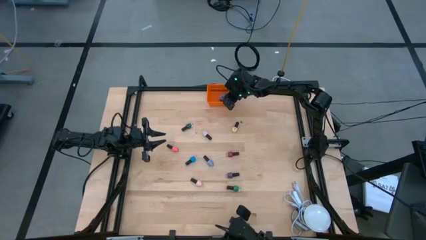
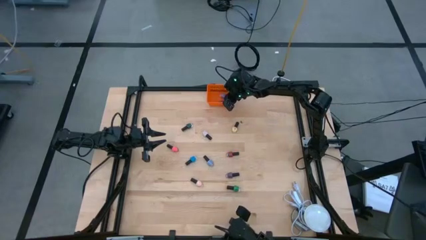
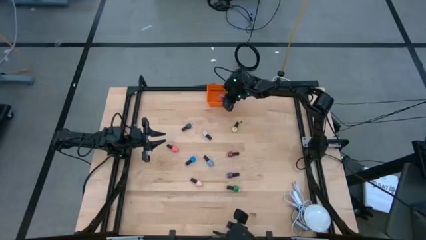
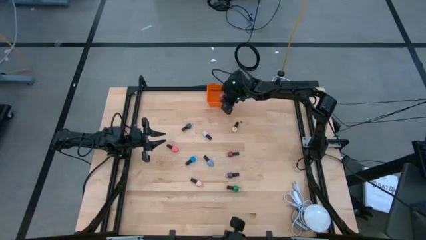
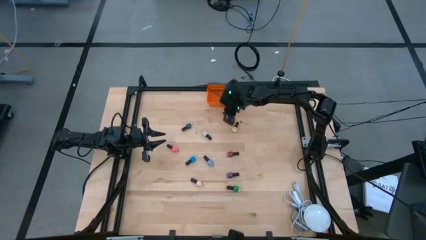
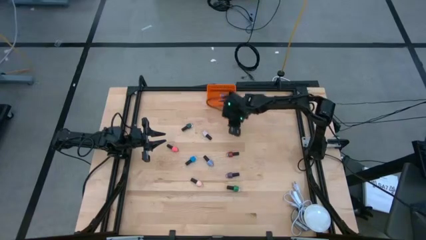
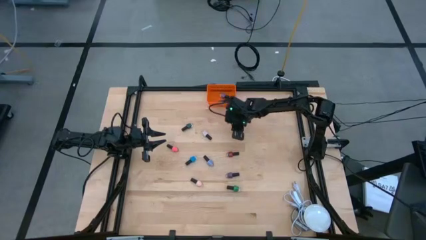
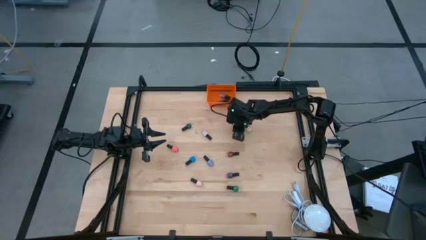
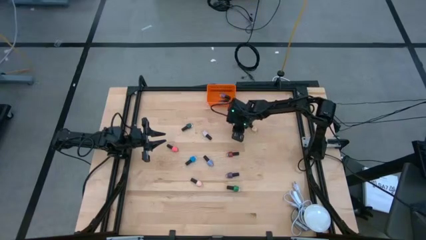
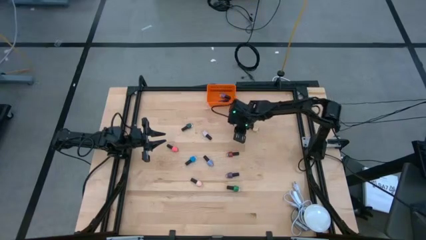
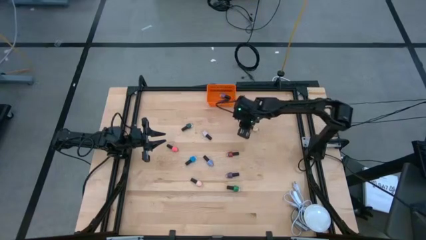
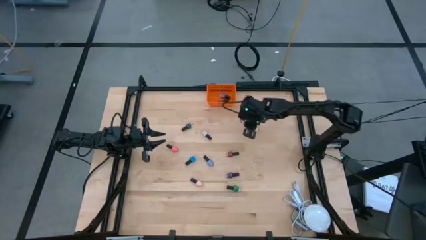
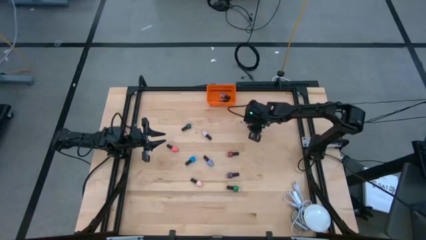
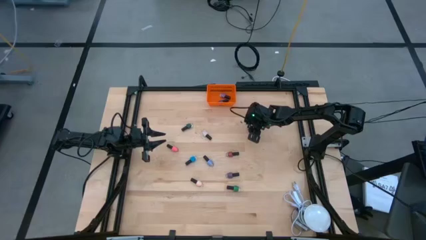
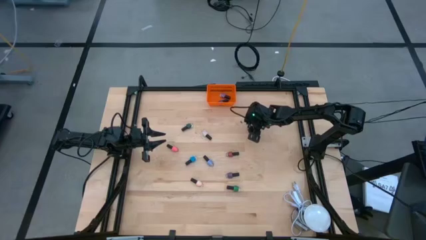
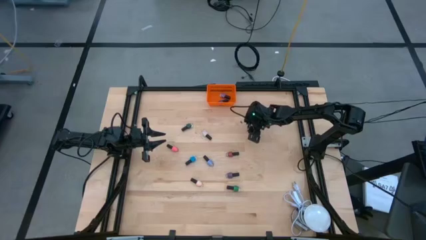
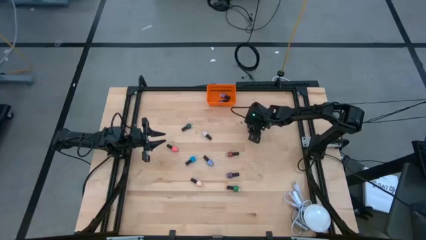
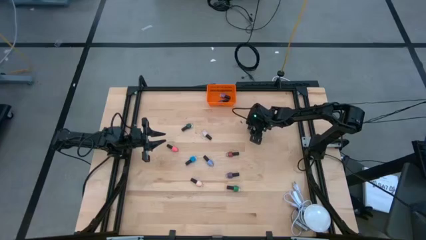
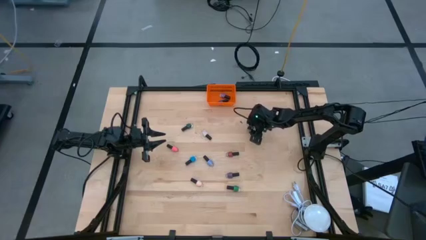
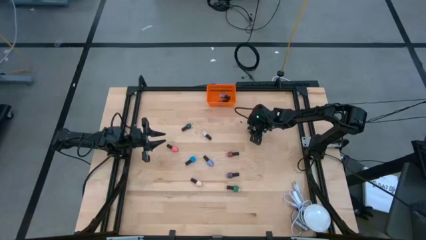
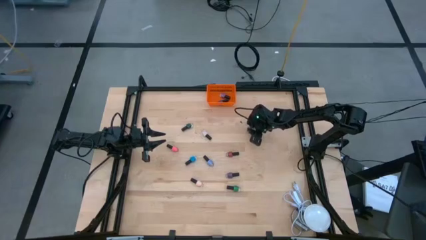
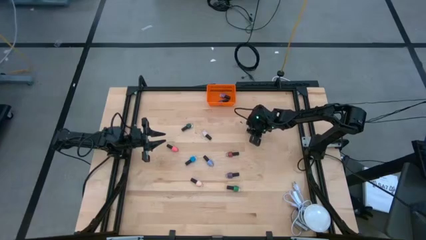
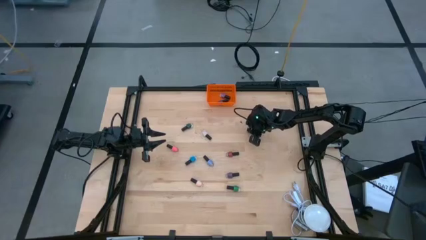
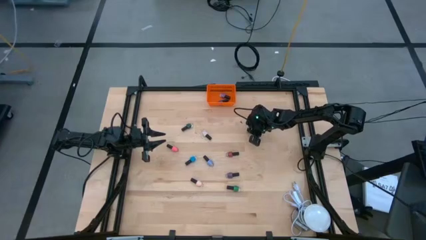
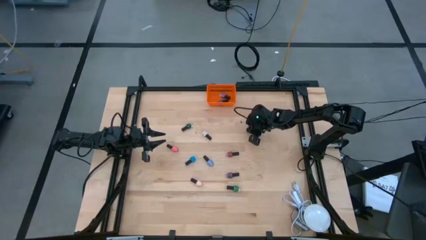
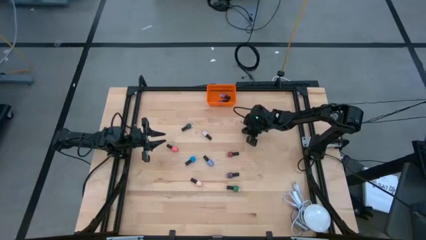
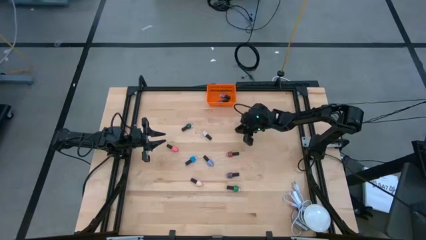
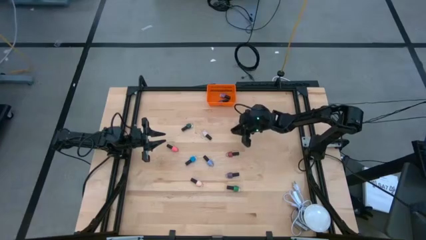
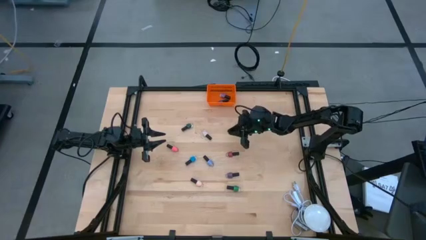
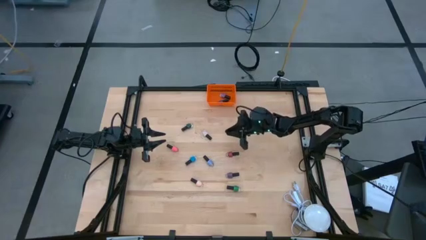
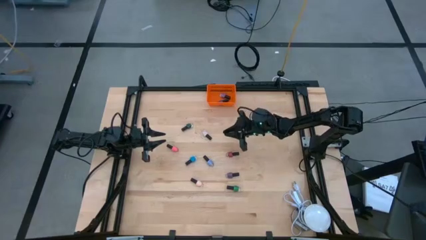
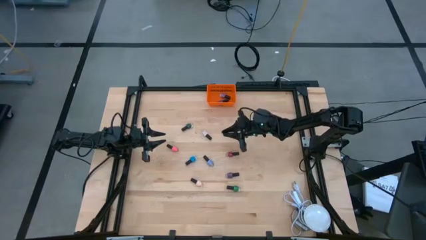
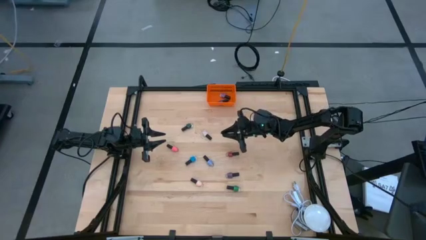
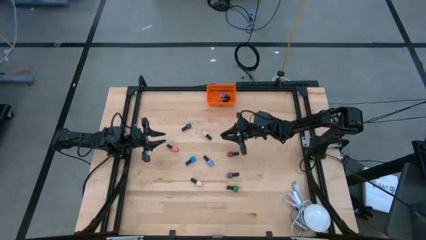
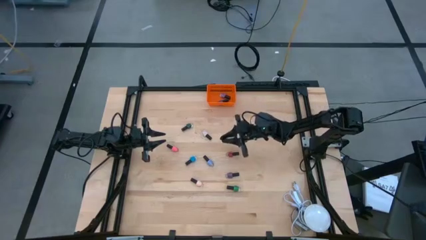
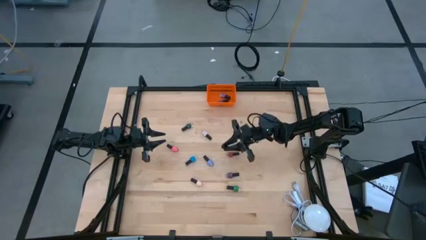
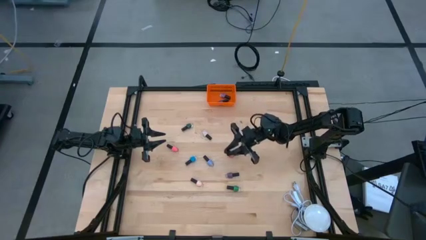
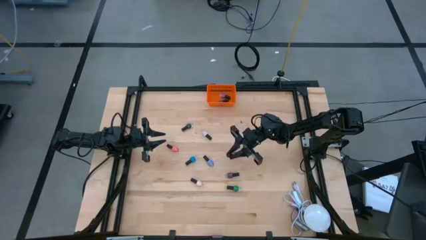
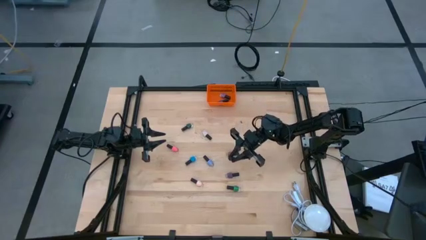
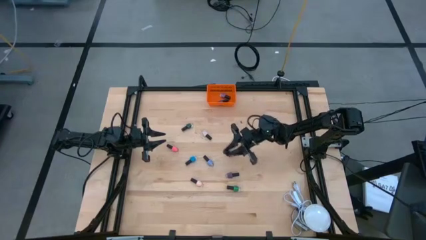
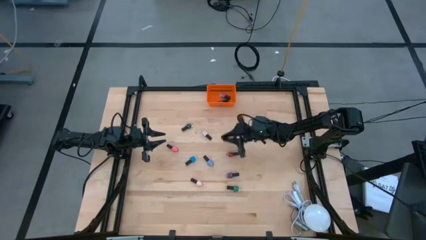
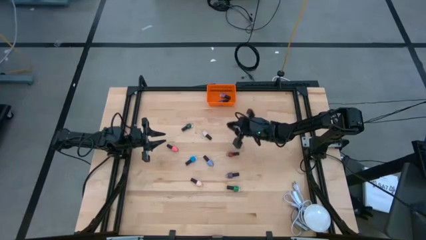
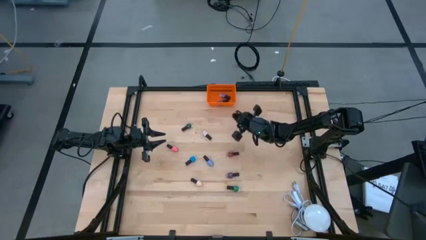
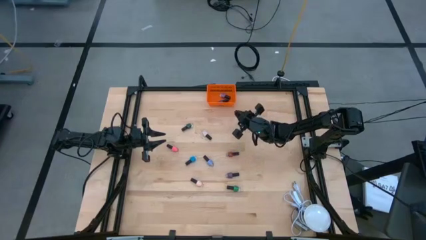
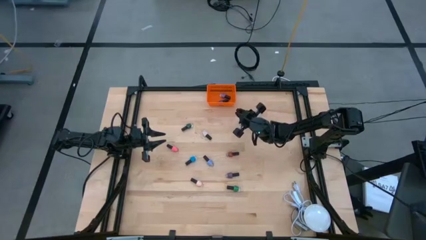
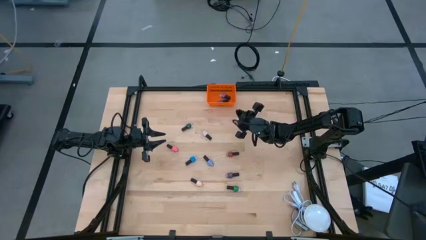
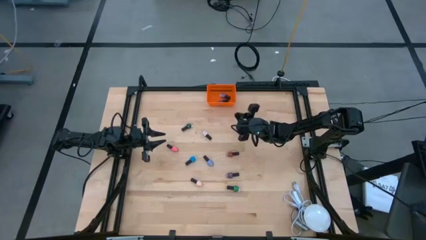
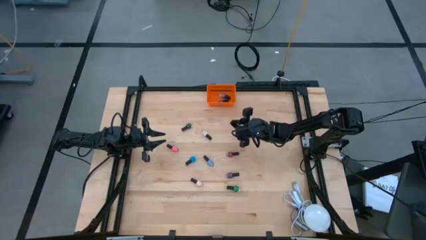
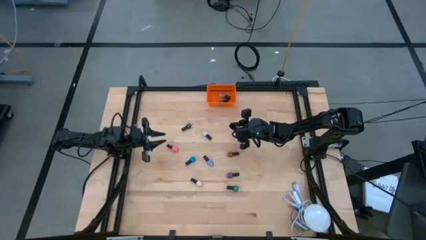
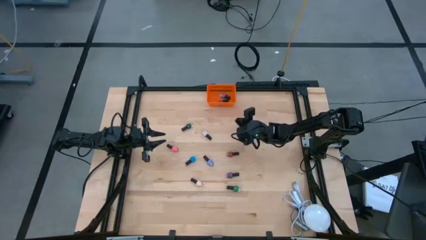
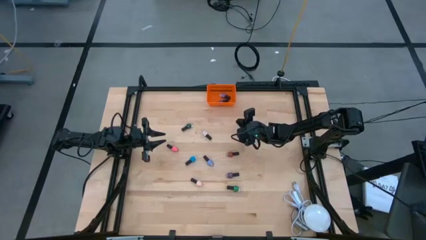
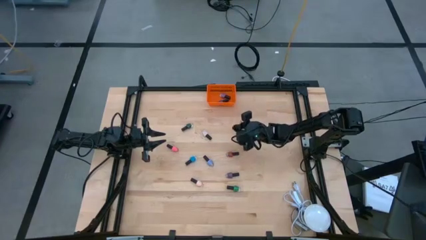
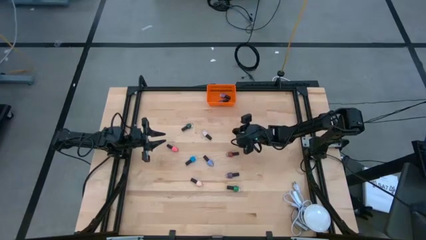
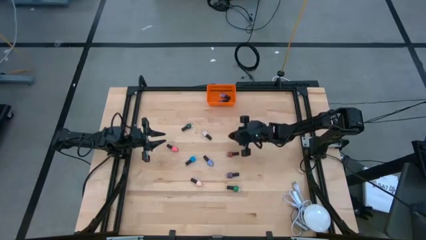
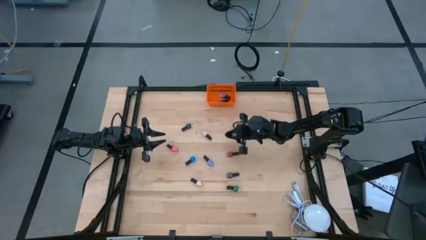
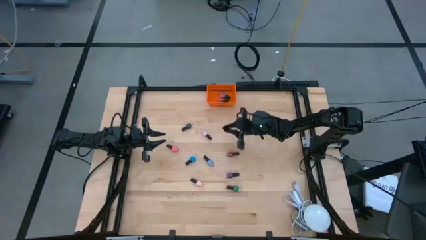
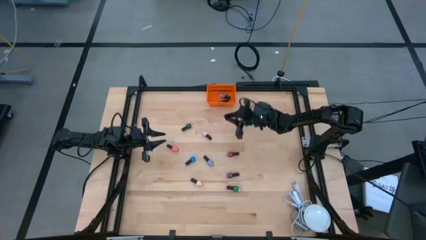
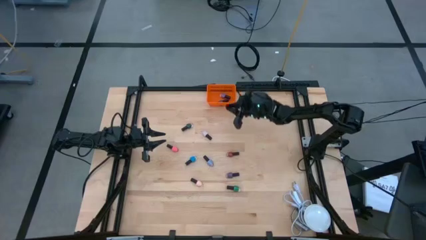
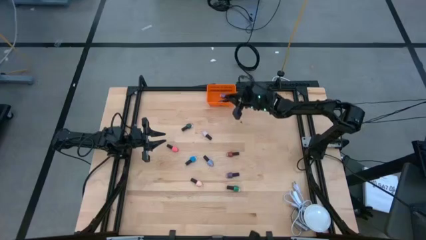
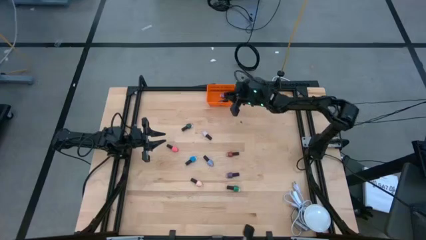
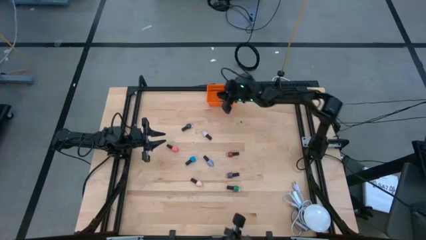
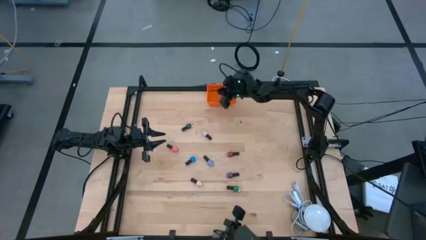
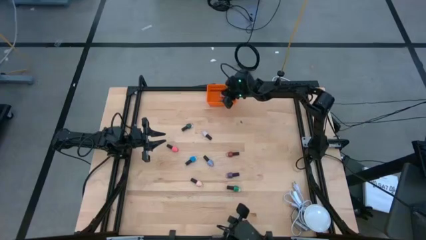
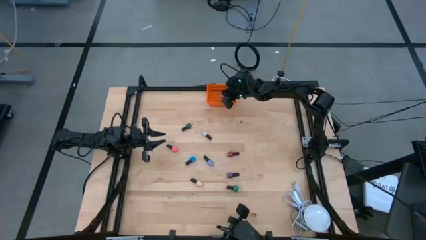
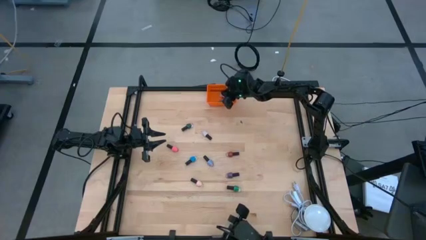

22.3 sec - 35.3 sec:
Task: Pick & Place Nail Polish
Put the yellow nail polish bottle into the basket
